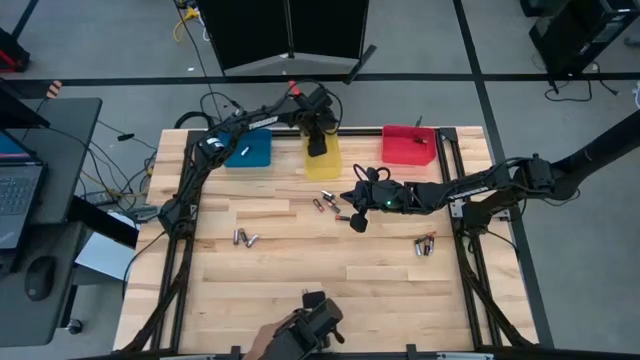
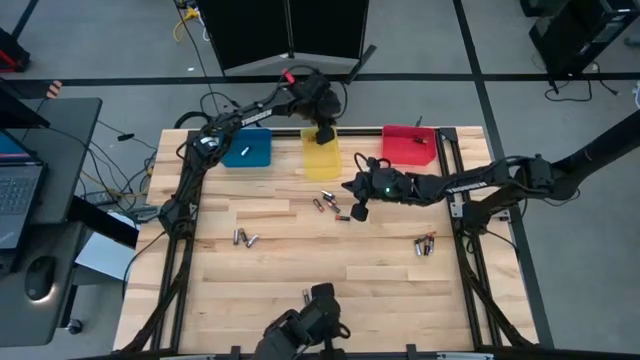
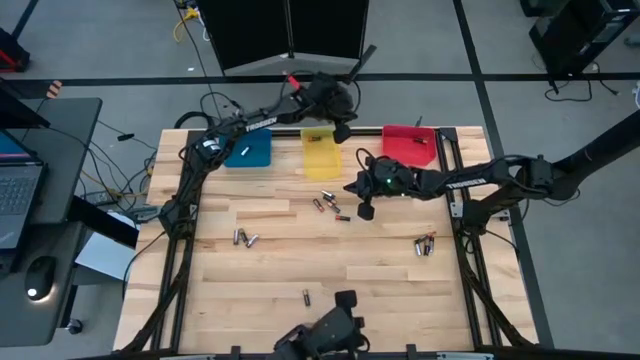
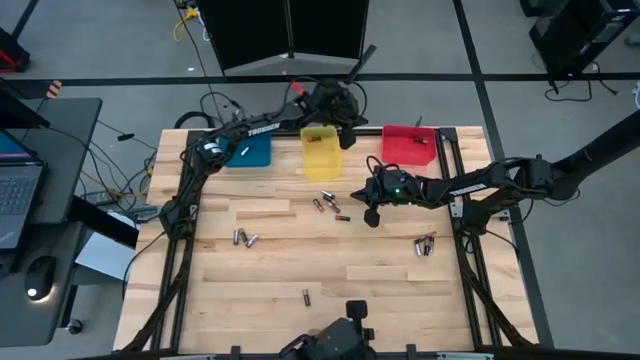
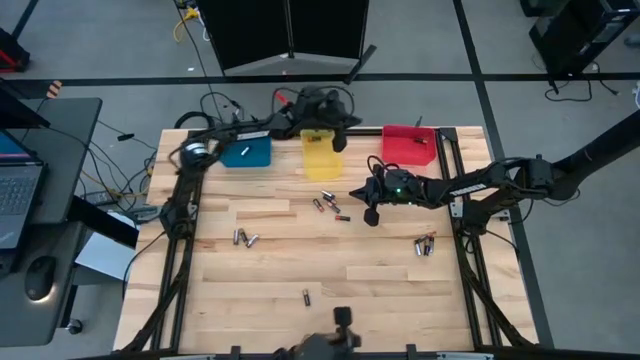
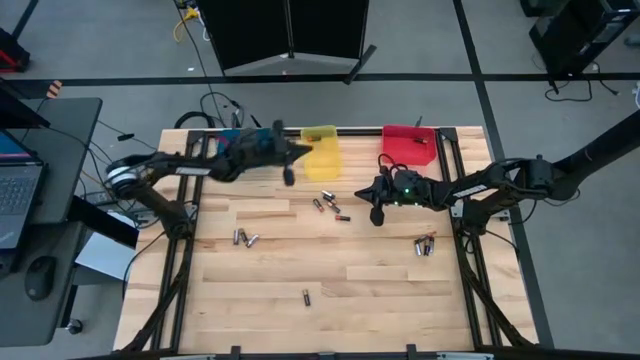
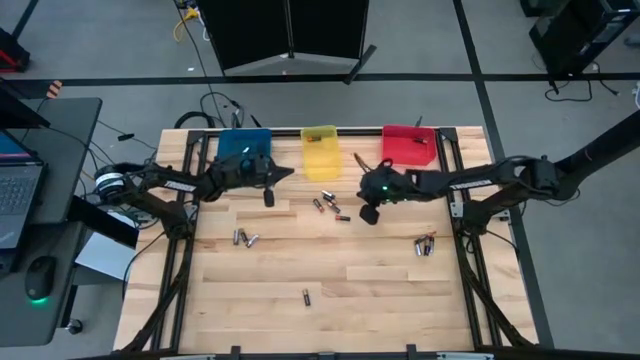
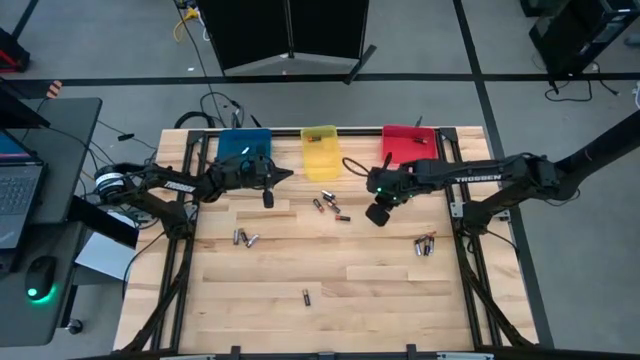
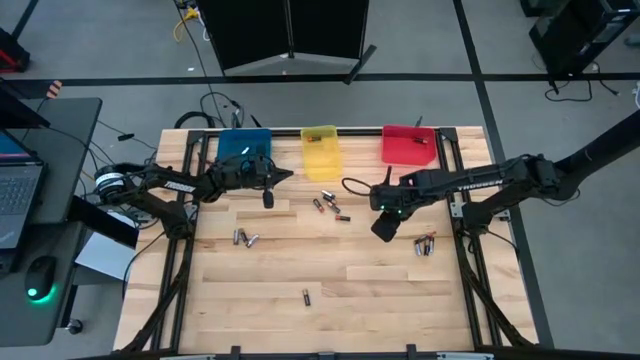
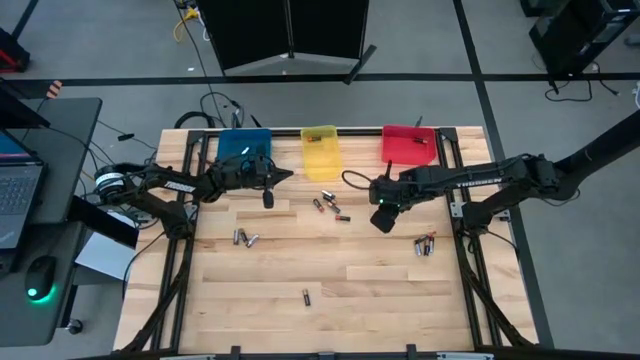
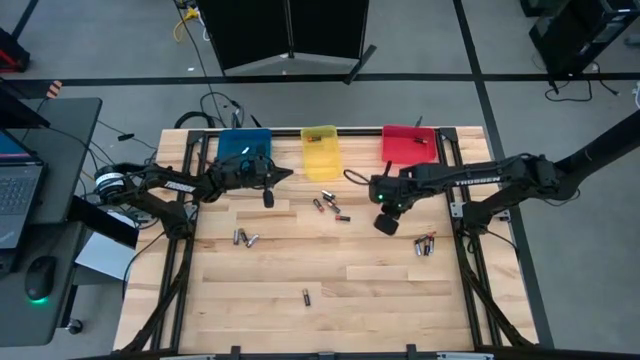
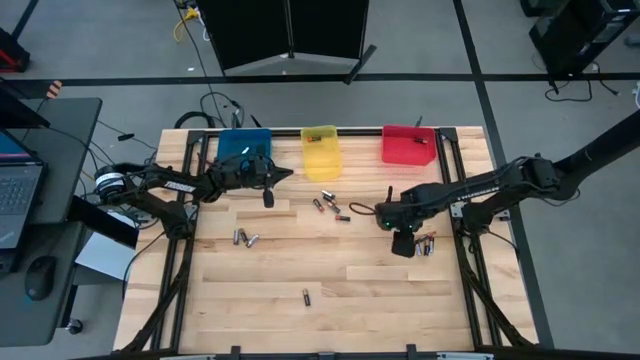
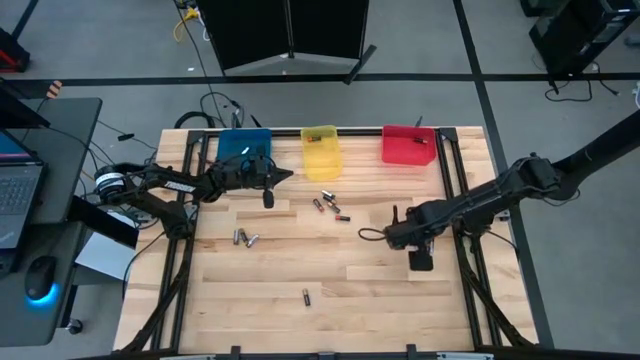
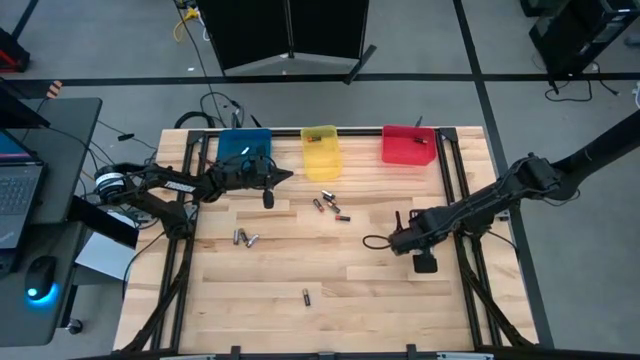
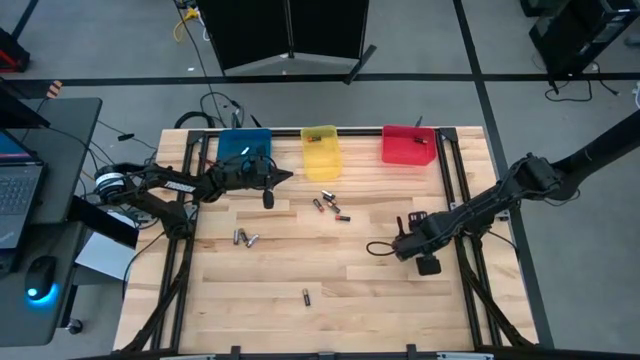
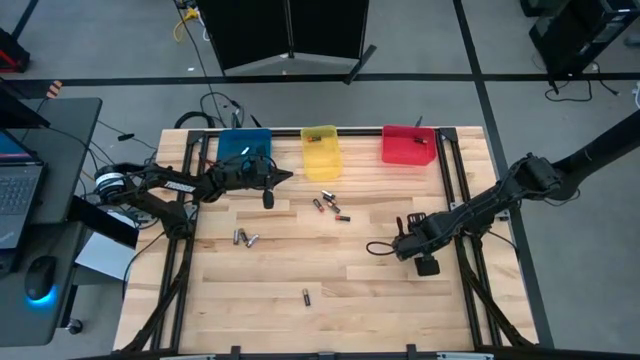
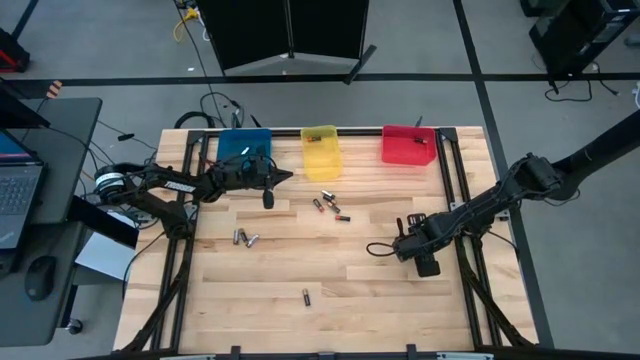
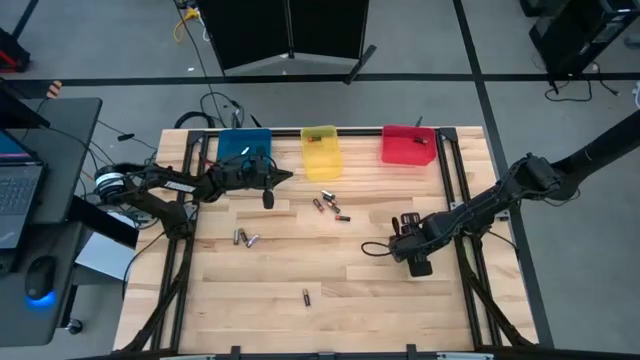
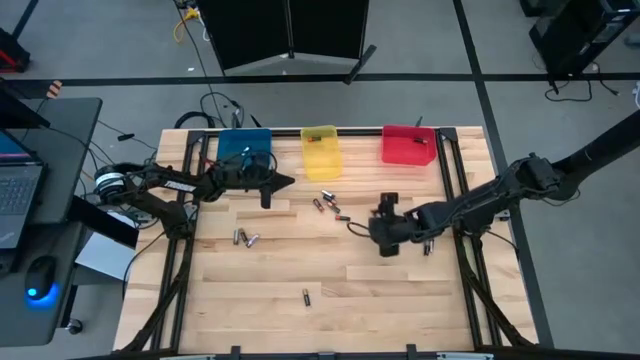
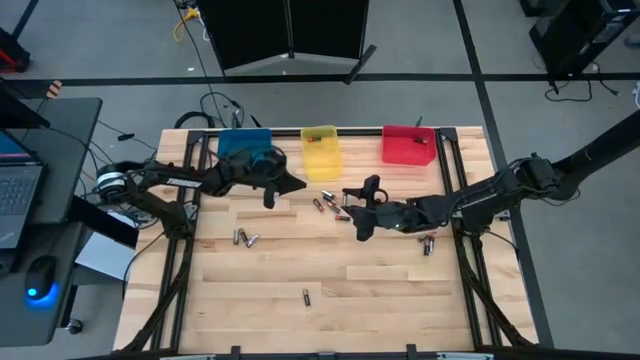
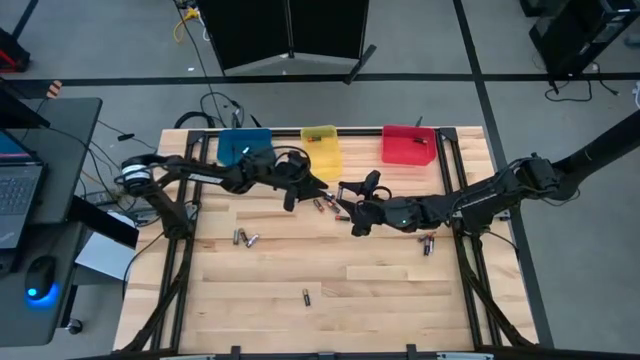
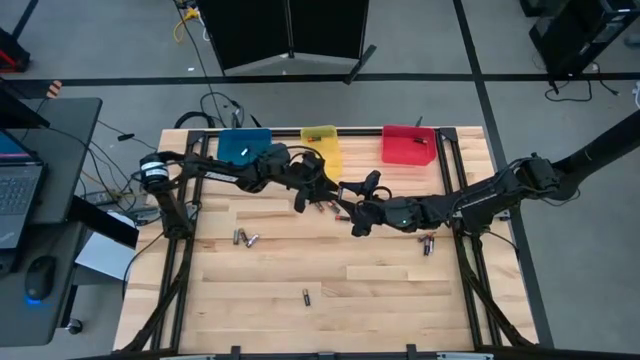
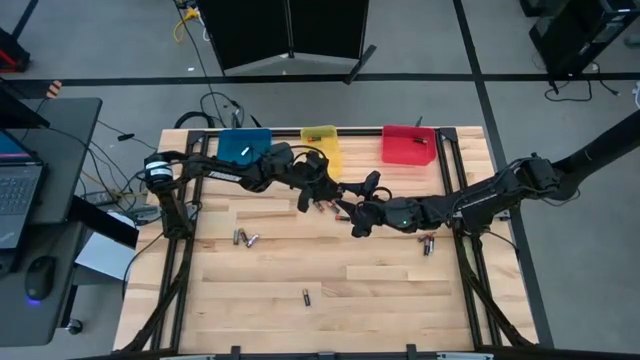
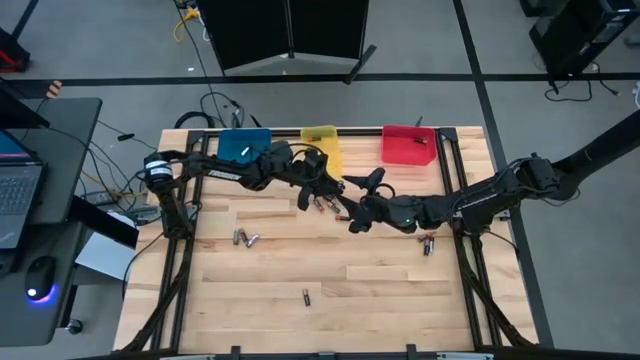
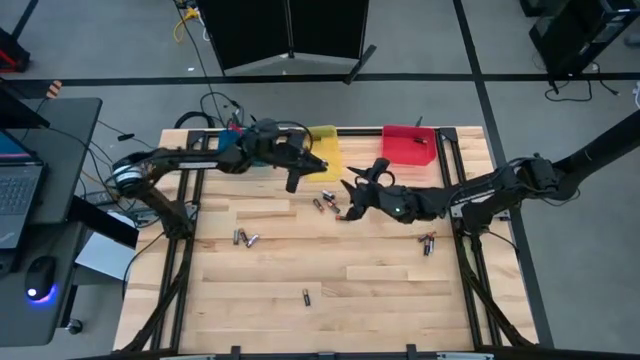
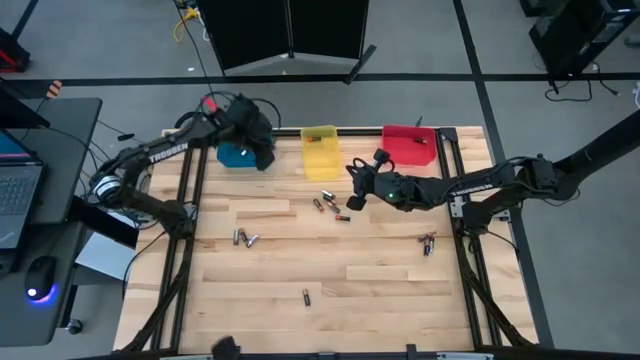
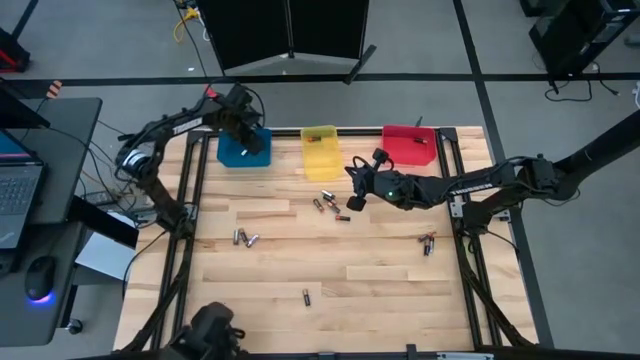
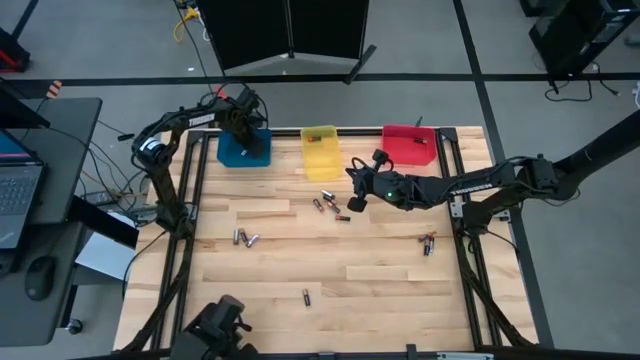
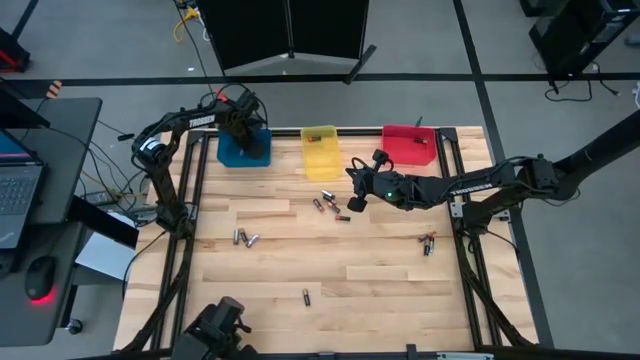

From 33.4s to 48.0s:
Task: Sort batteries
Put the silver battery into the blue bin

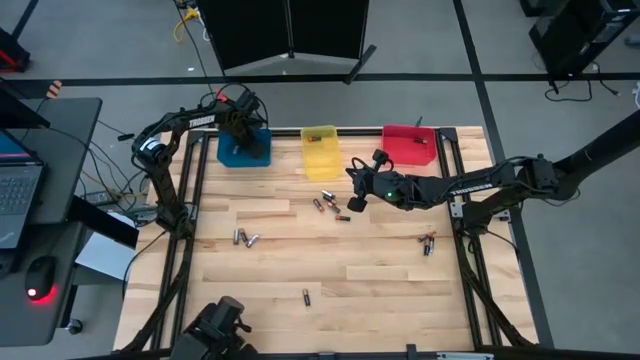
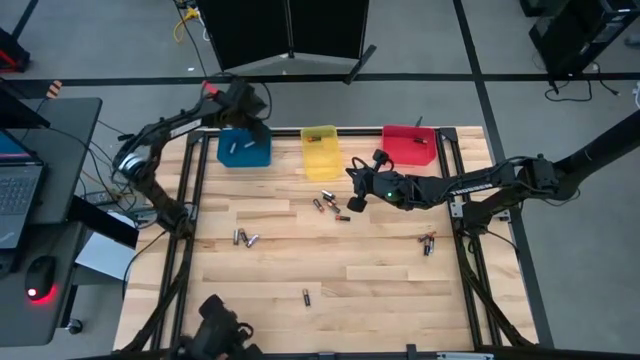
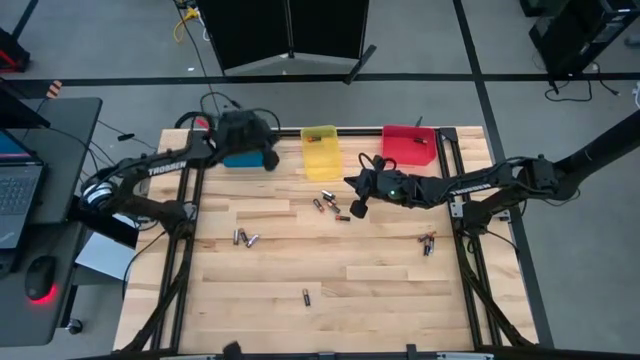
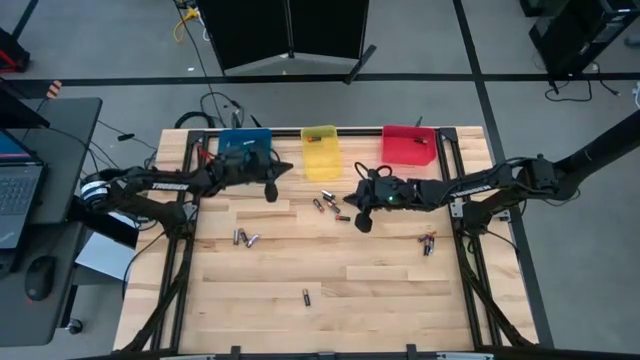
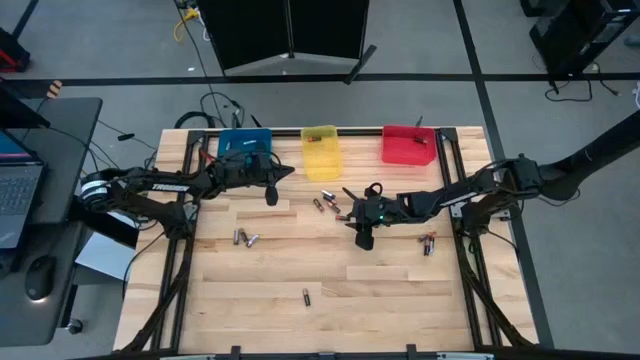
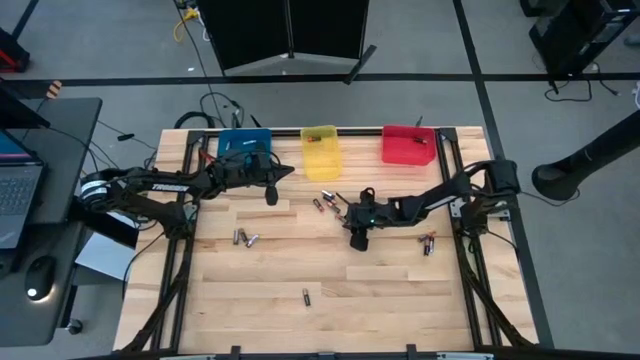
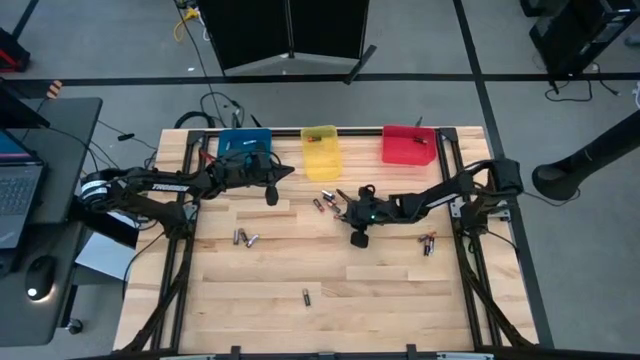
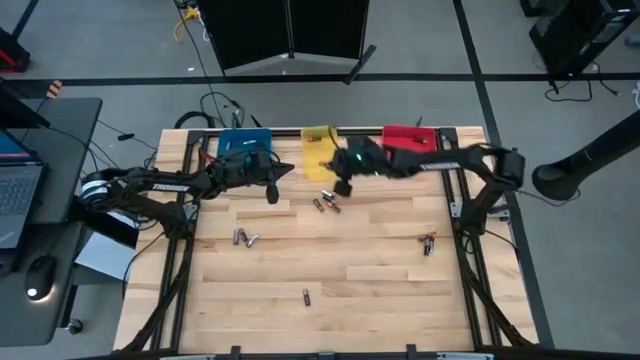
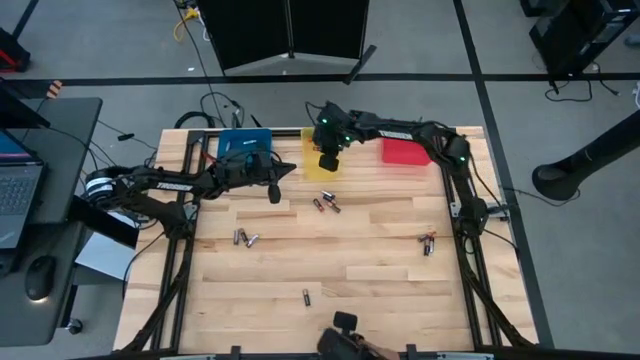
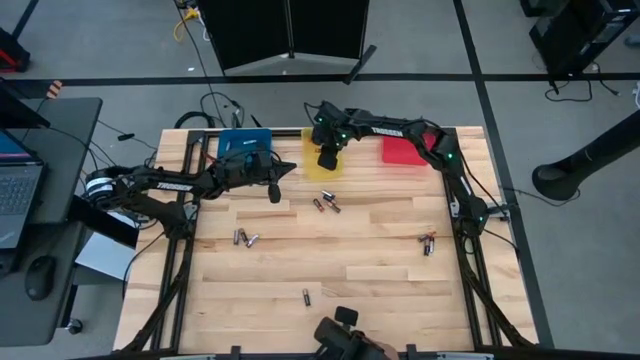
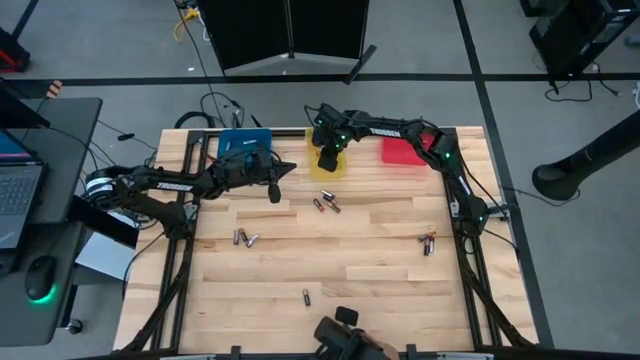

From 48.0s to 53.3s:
Put the middle black red battery into the yellow bin
